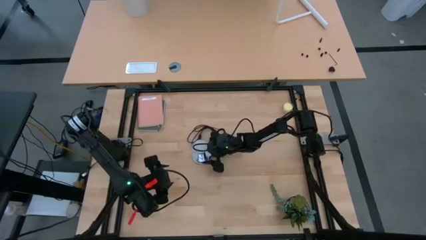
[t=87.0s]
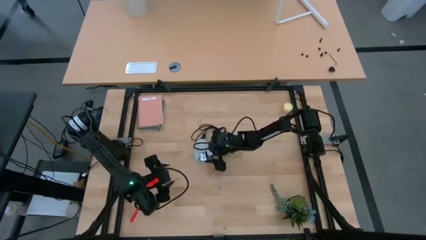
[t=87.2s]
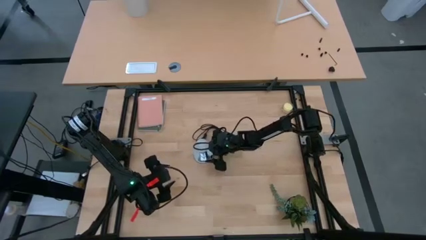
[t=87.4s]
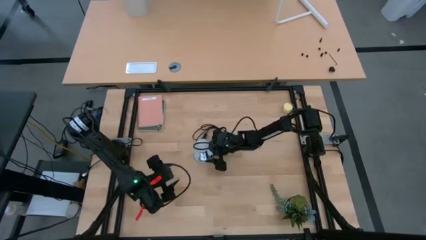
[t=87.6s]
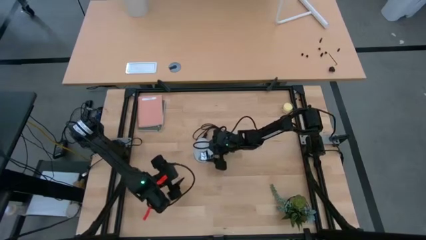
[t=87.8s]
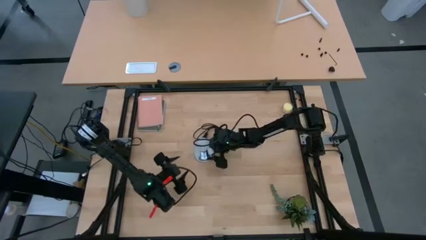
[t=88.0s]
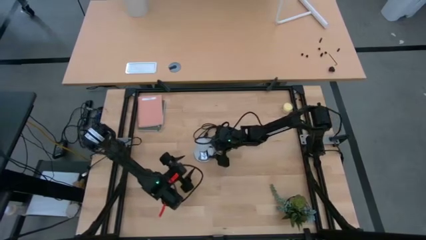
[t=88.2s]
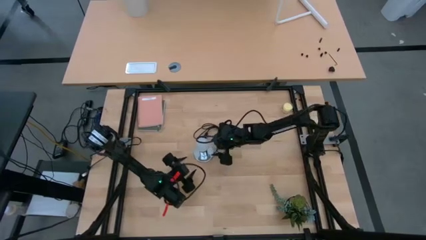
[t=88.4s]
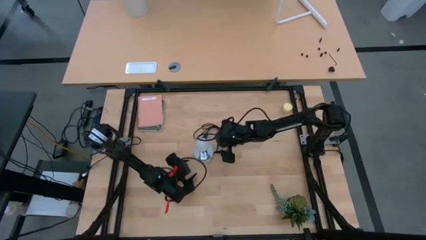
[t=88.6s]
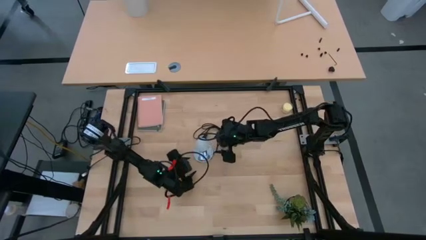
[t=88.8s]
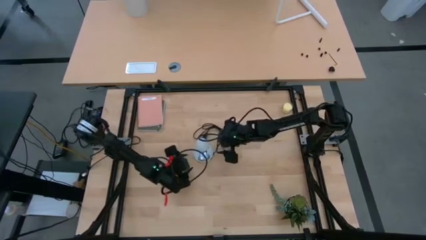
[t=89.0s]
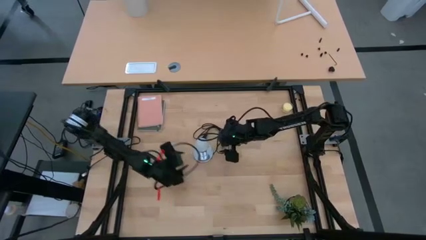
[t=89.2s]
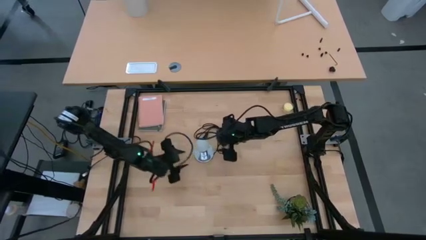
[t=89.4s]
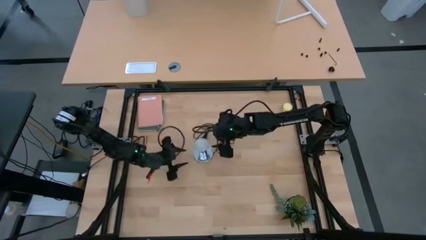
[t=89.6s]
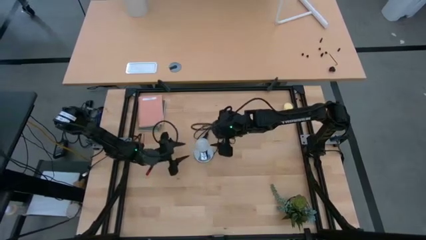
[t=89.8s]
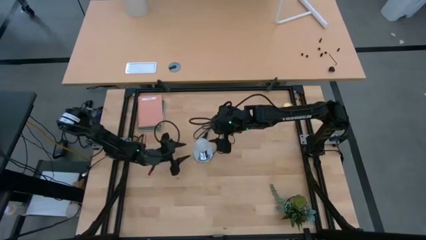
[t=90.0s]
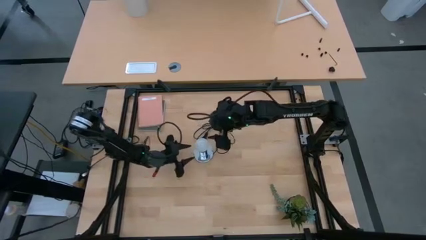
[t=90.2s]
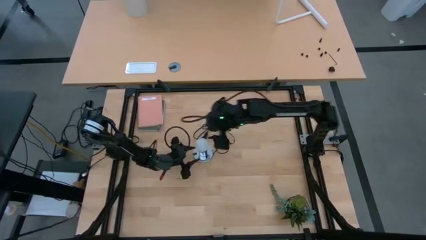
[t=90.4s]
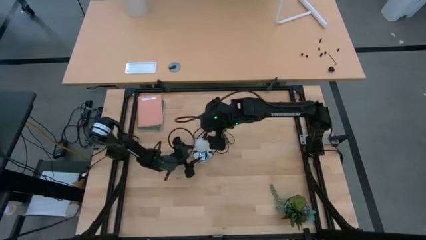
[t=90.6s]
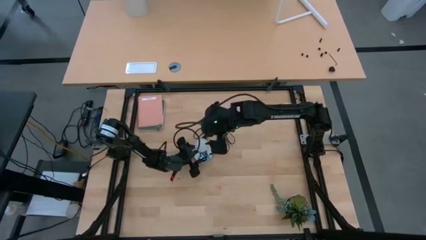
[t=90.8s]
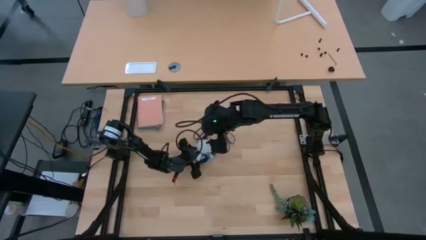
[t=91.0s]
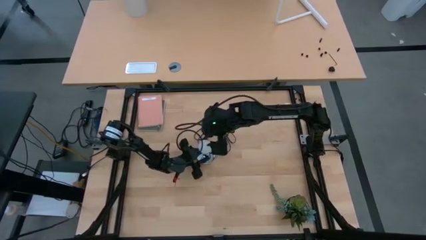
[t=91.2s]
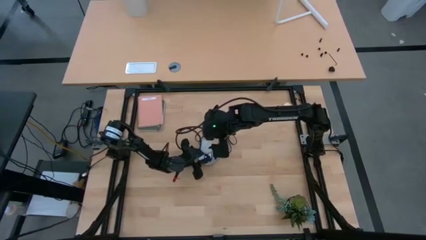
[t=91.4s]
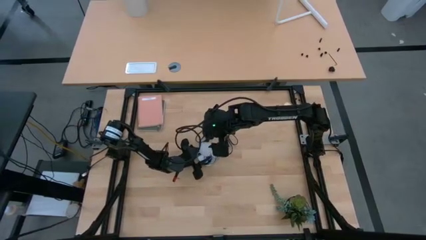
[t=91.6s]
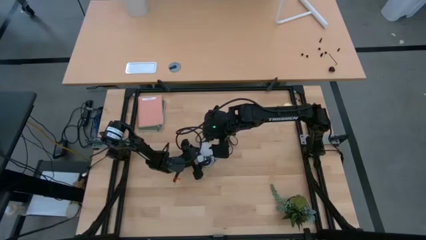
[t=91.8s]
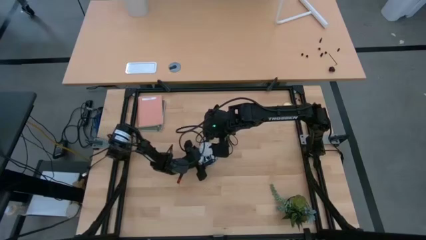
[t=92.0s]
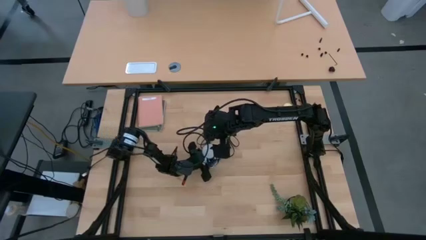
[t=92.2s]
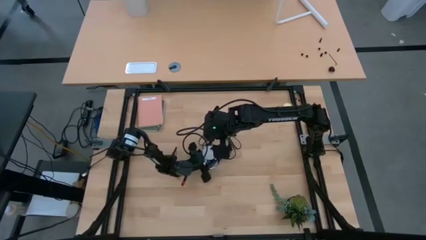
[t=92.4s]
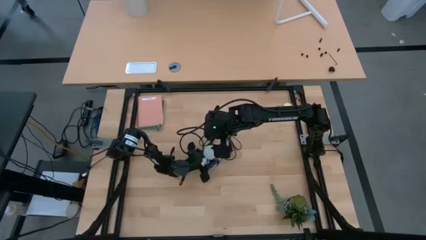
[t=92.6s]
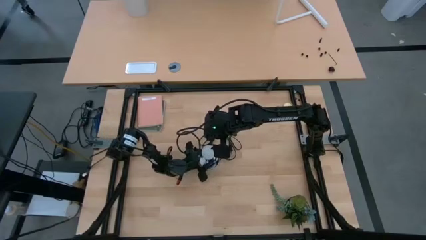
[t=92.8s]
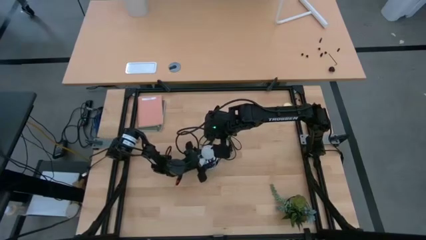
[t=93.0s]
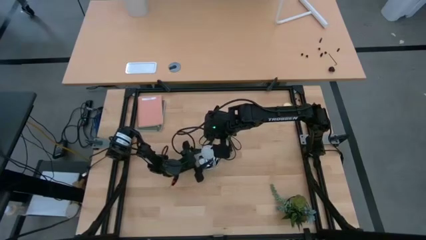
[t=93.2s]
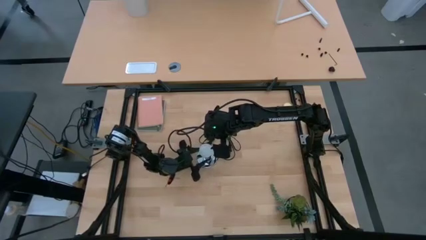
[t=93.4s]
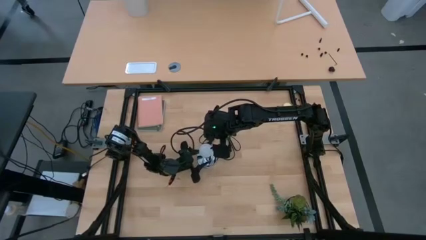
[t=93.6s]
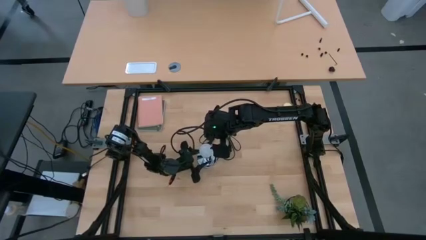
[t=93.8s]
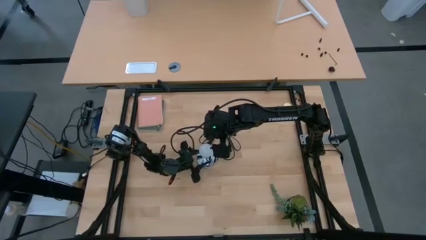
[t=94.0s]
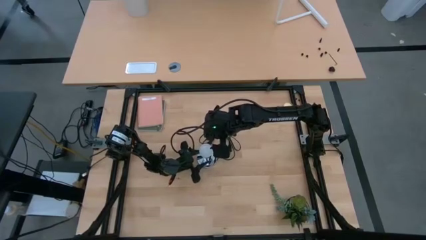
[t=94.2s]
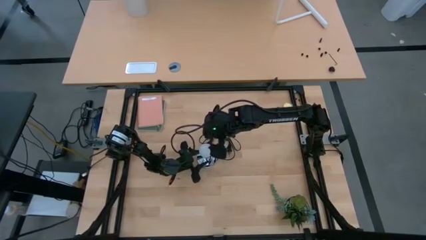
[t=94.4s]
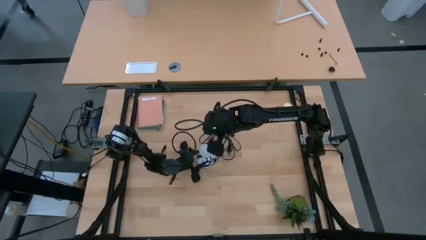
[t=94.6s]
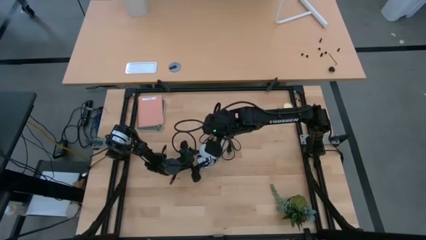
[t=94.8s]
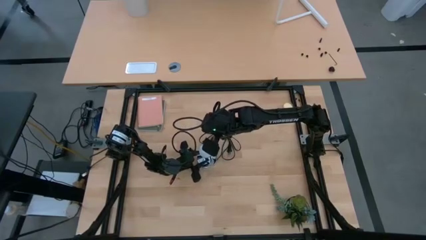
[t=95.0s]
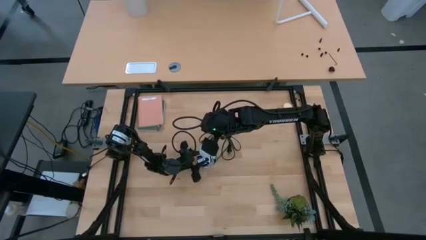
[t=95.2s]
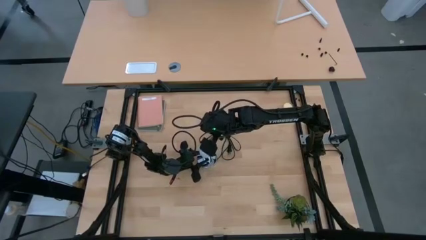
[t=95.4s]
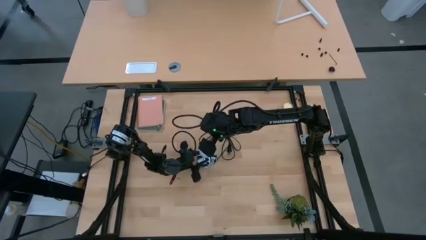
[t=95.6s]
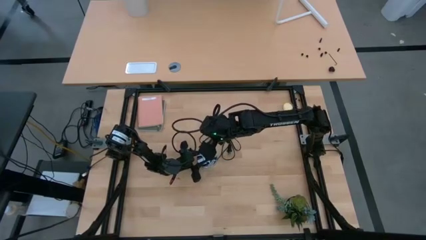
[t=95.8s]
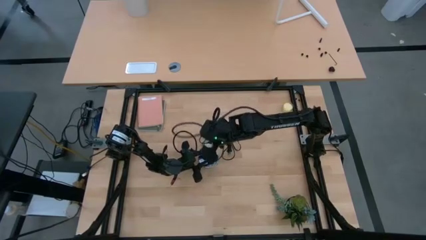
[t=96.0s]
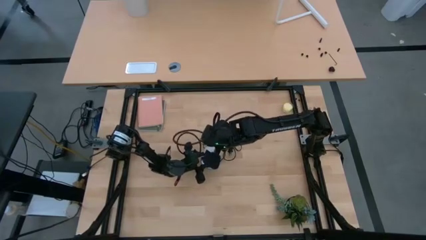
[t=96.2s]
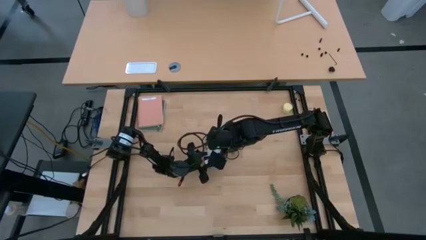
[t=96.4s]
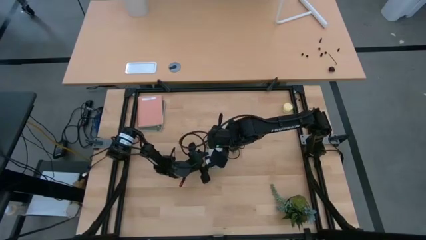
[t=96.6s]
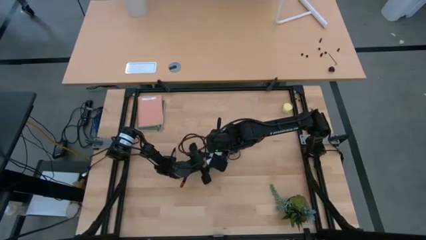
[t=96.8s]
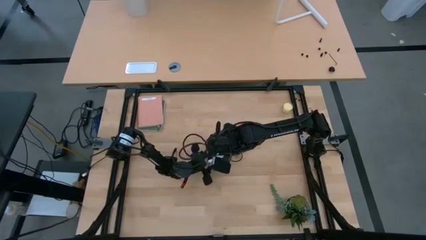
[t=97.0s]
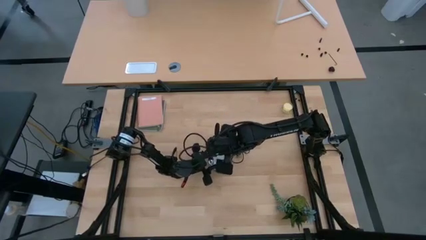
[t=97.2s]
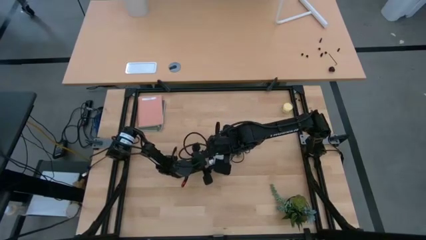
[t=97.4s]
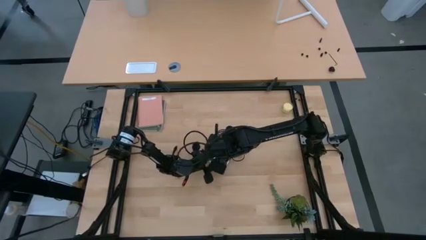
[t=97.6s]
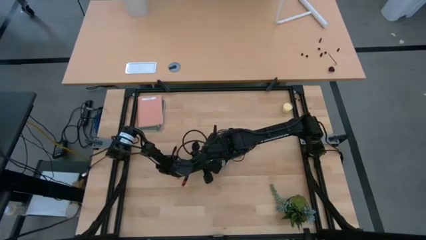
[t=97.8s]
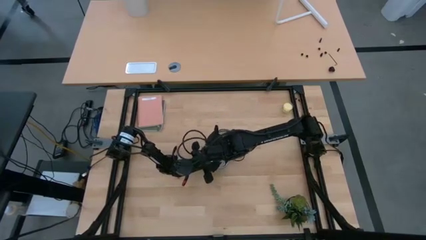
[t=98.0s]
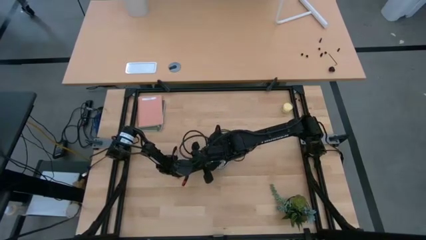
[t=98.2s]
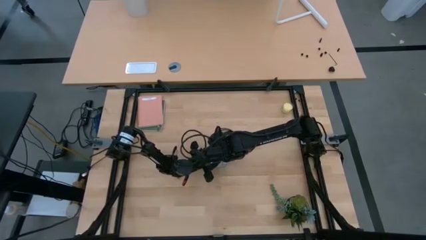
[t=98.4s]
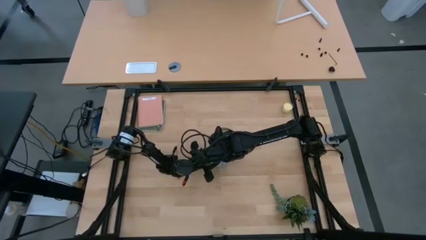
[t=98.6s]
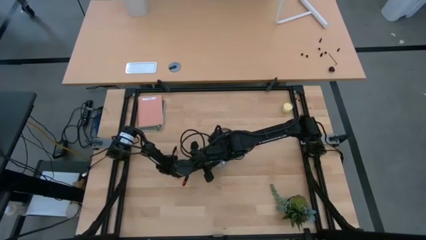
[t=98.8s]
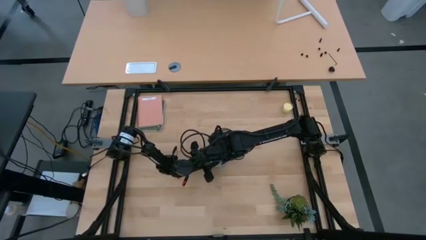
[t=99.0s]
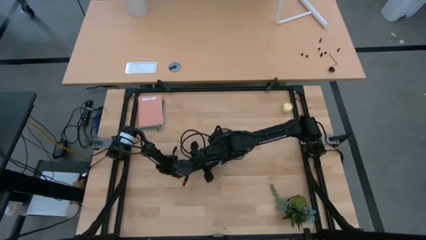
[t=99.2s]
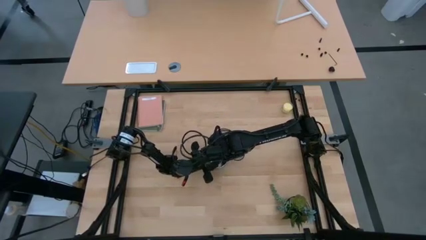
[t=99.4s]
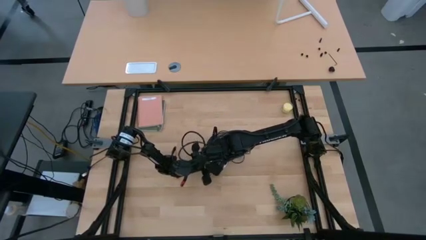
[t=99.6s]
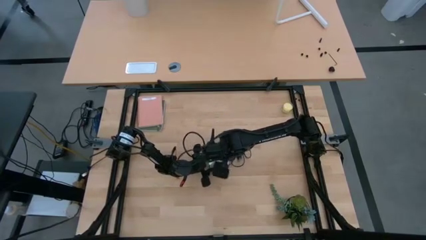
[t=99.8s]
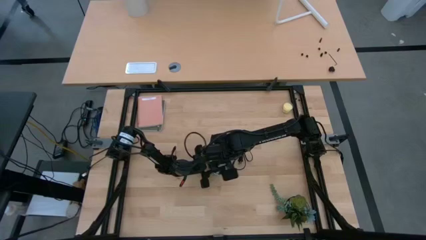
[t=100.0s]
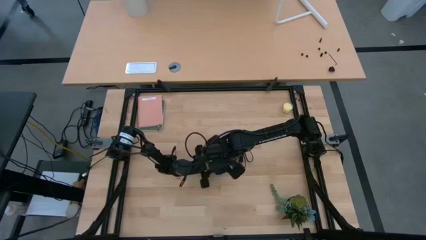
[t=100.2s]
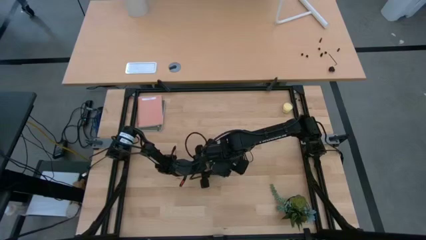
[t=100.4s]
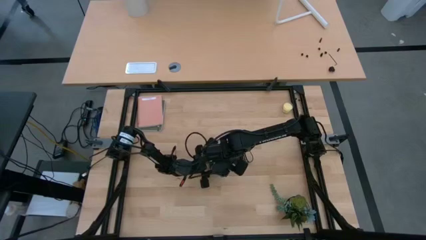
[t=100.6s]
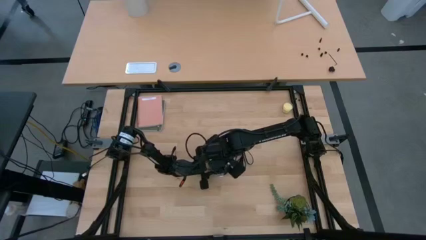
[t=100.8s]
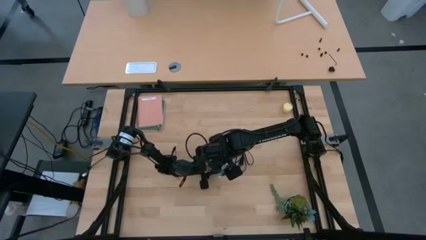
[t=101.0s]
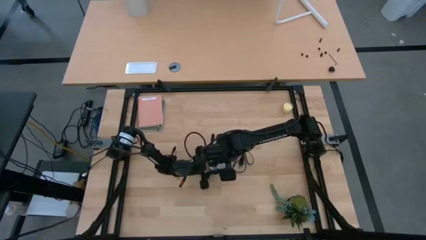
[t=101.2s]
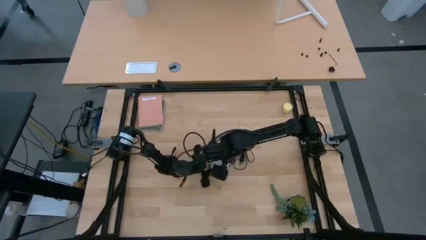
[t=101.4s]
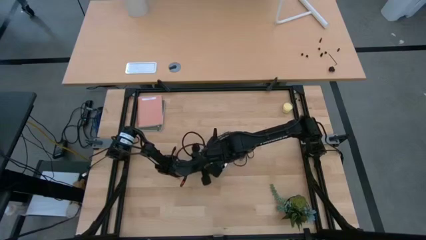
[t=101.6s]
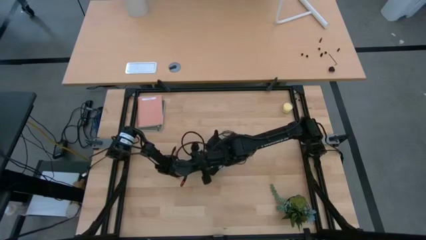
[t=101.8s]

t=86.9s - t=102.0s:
Task: Screw lightbulb
Remove the lightbulb from the silver lamp
